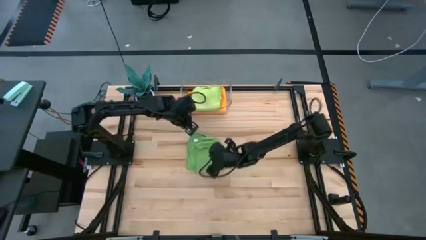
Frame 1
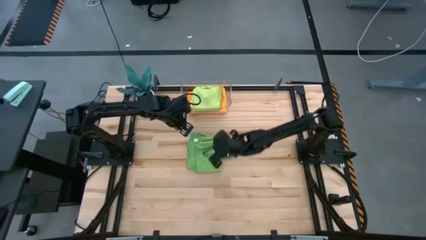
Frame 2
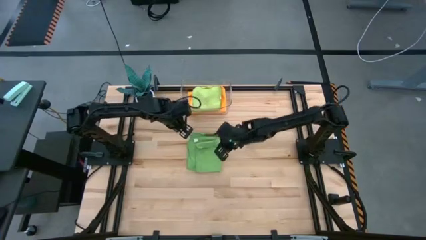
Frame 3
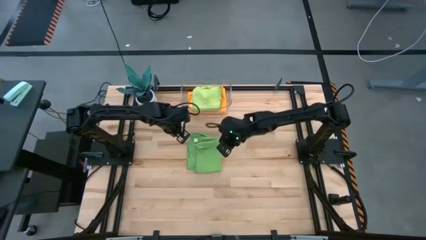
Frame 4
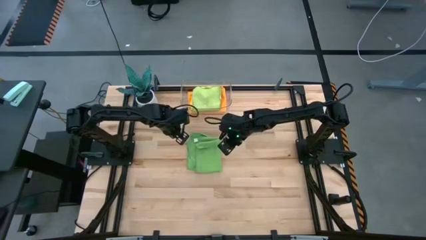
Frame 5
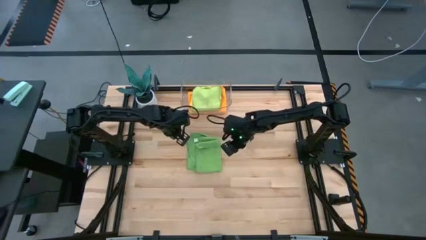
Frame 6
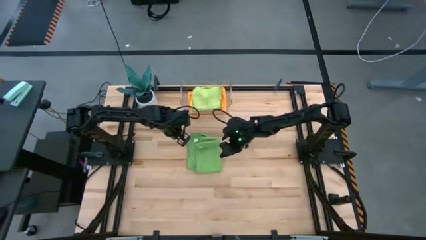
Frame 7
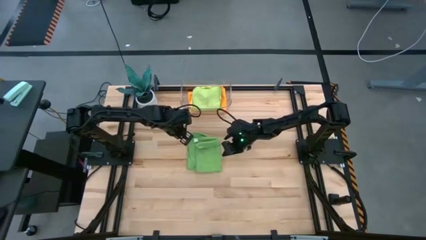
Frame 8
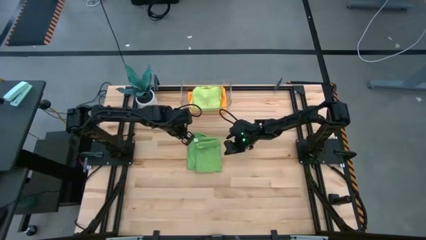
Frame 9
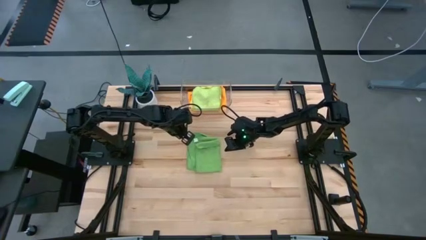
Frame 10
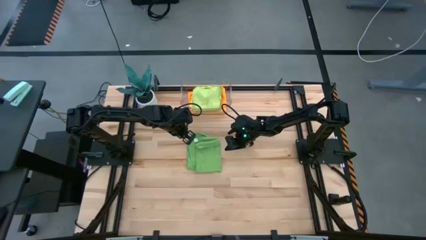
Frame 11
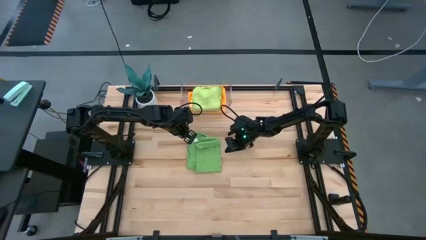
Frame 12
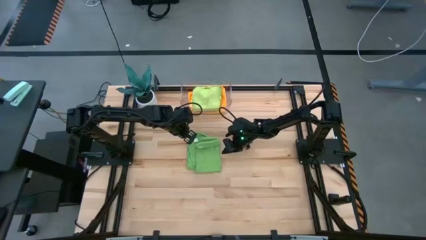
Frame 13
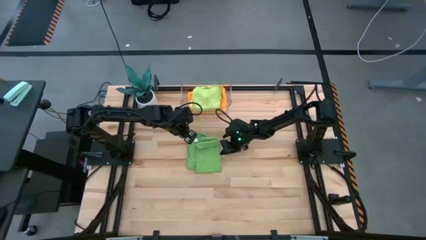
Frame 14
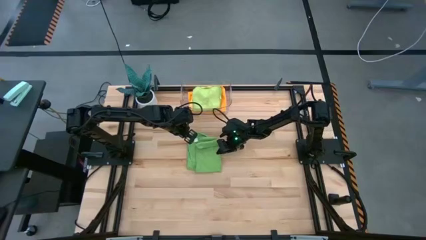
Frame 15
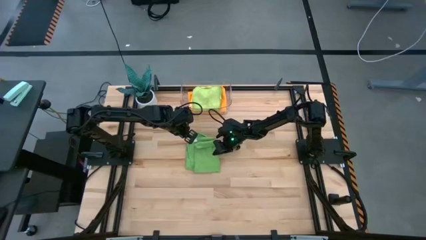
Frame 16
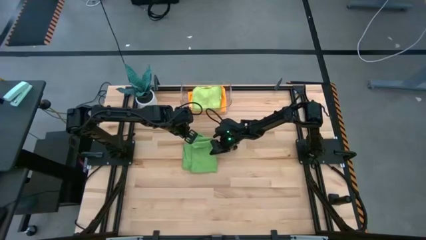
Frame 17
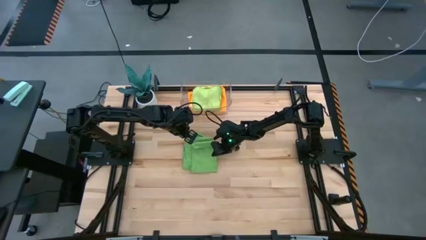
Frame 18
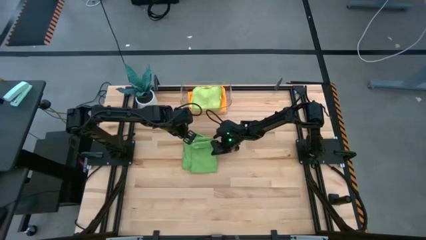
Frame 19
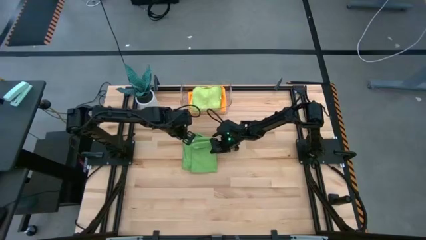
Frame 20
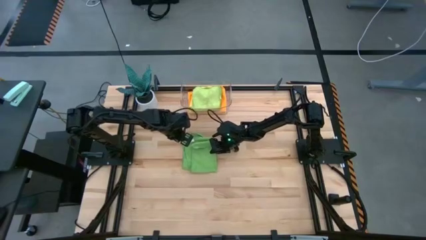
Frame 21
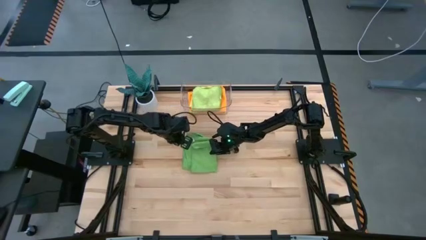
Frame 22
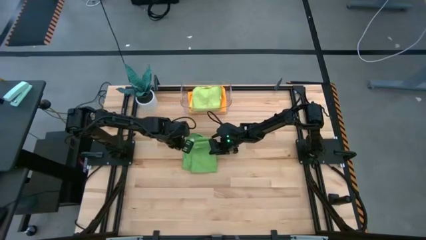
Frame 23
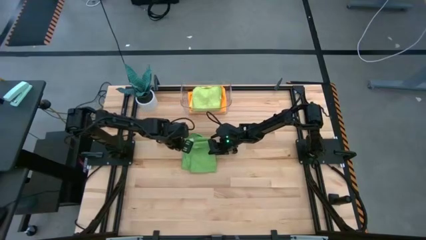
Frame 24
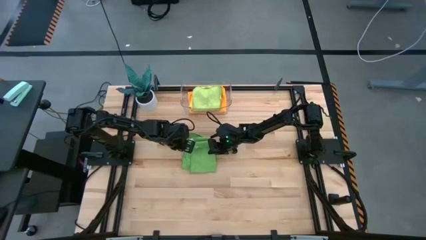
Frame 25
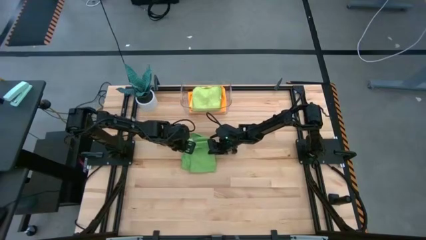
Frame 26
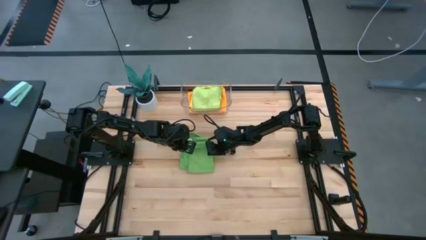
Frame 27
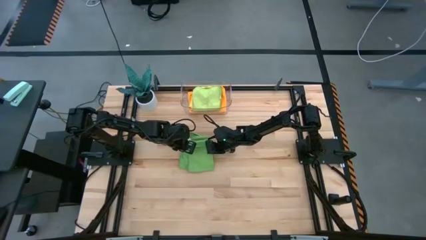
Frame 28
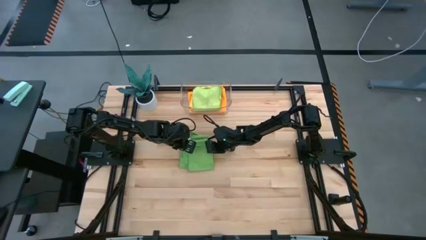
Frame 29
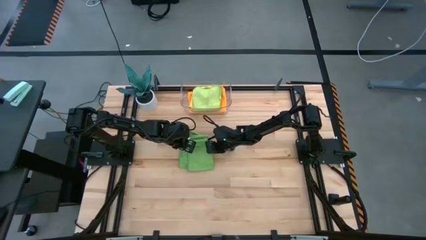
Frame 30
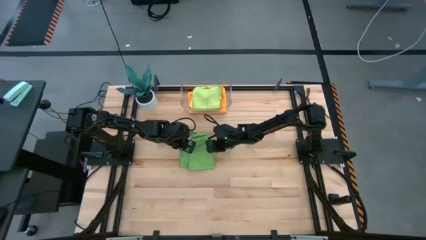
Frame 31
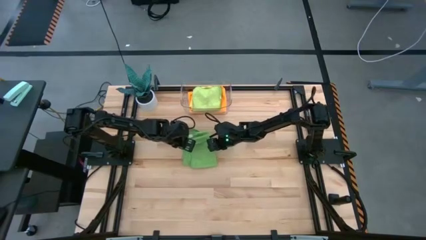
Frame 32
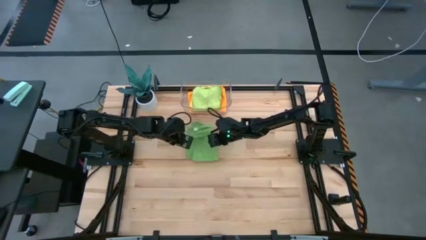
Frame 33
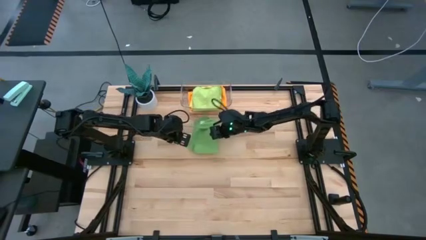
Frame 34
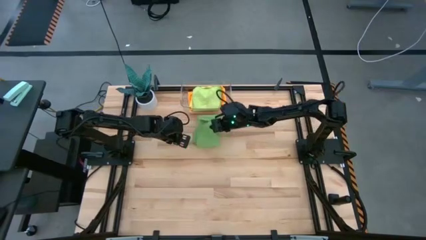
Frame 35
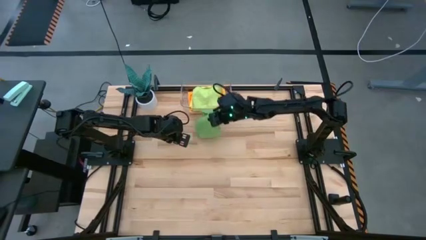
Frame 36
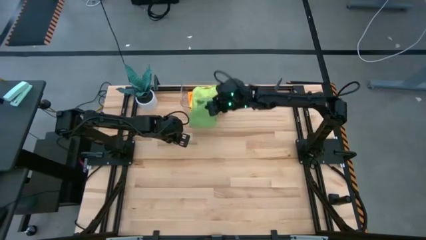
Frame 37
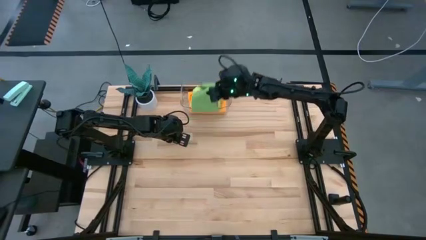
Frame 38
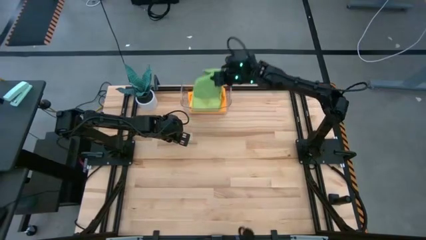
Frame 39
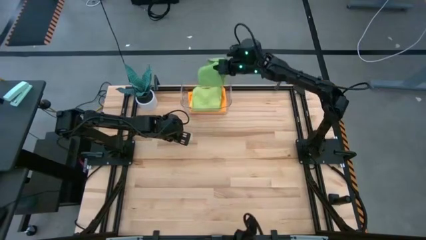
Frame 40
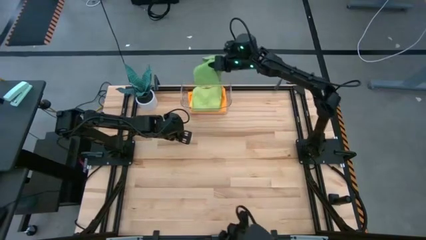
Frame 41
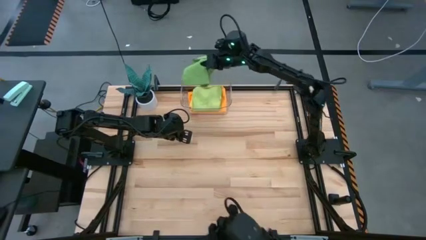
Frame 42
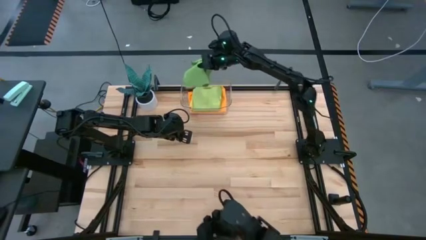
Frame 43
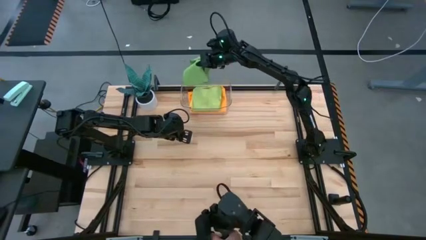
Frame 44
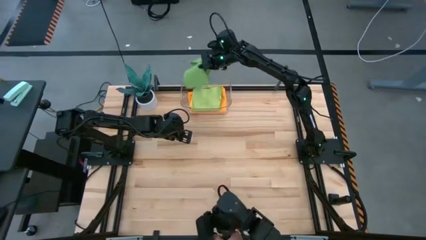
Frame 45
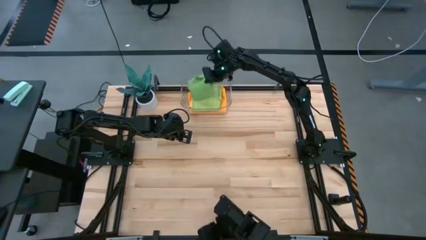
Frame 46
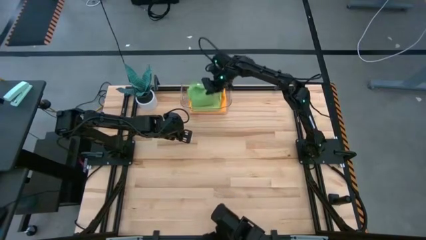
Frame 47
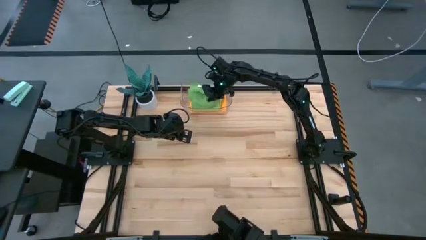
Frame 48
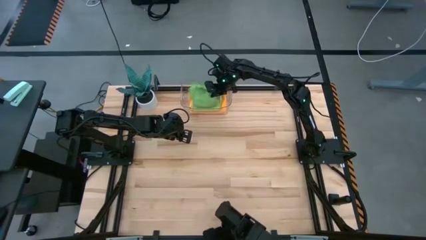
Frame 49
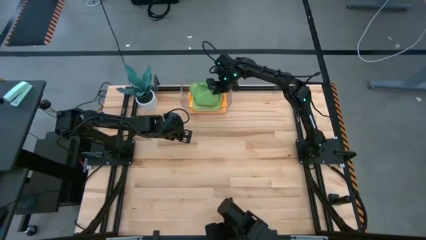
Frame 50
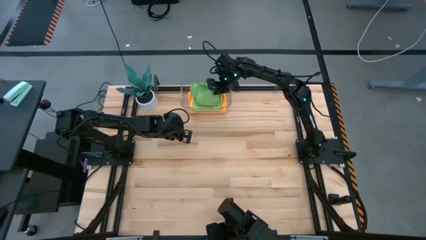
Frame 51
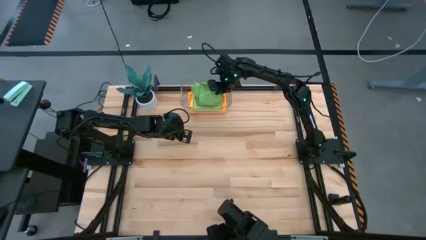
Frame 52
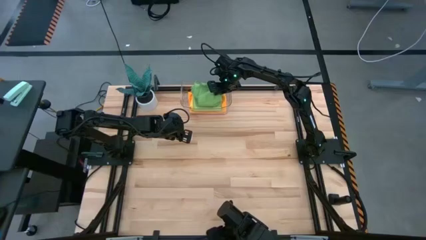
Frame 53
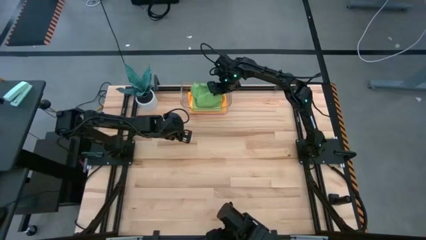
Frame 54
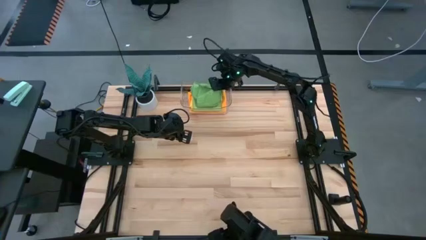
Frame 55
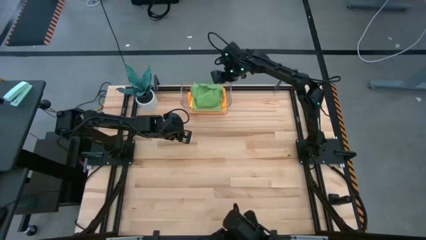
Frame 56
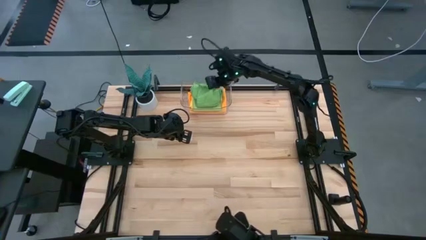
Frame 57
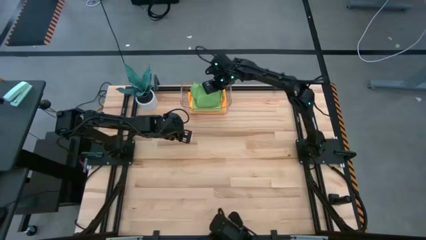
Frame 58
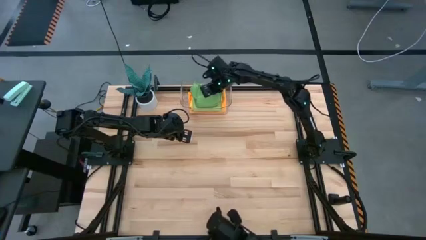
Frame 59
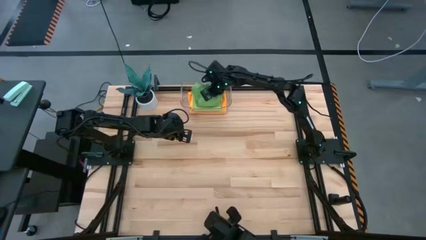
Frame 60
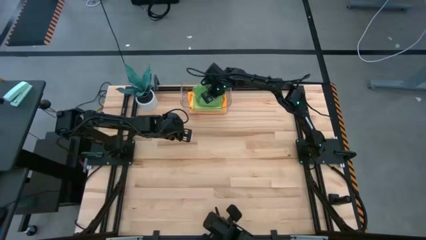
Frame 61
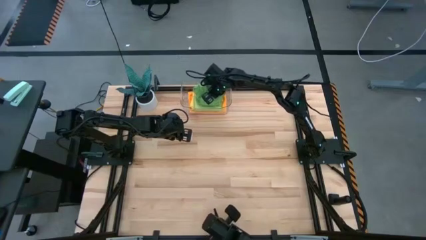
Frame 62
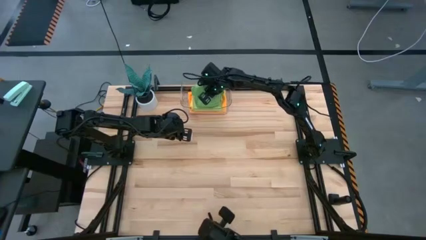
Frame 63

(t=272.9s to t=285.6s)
Task: Fold microfiber towels
Put the green towel into the transparent bin
